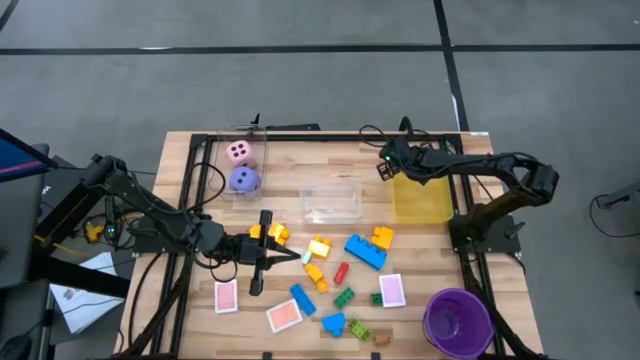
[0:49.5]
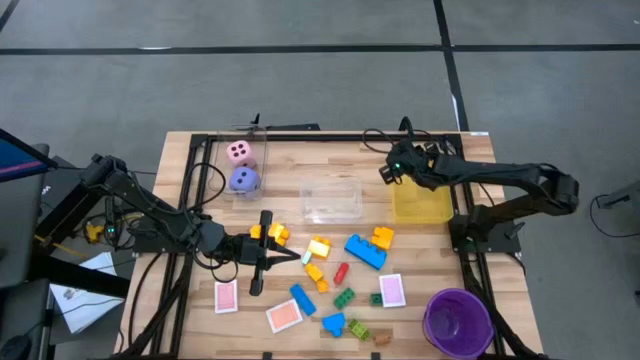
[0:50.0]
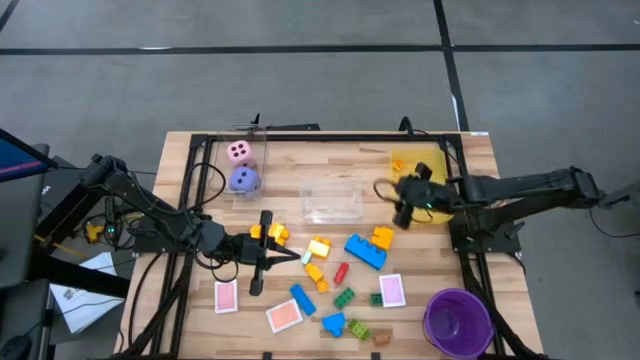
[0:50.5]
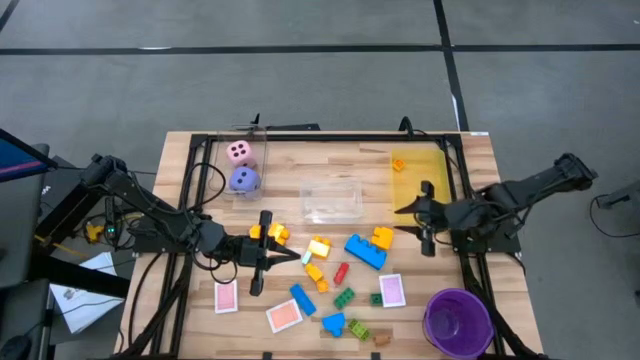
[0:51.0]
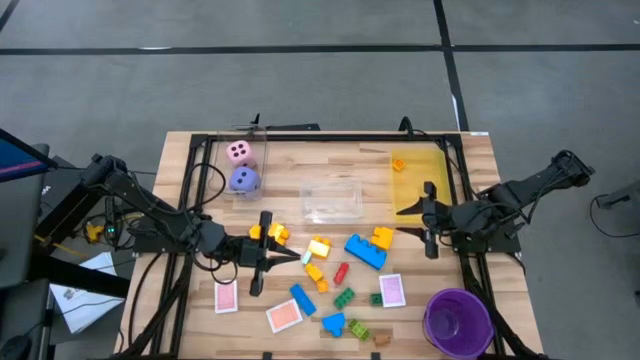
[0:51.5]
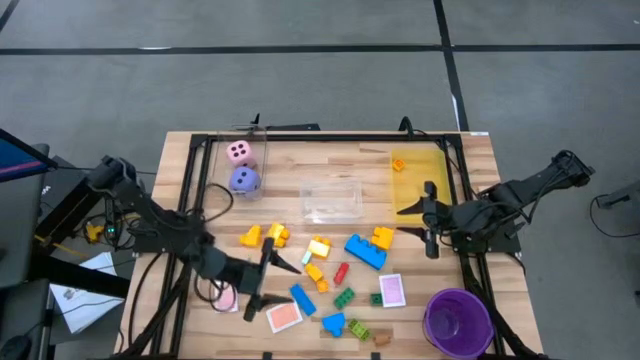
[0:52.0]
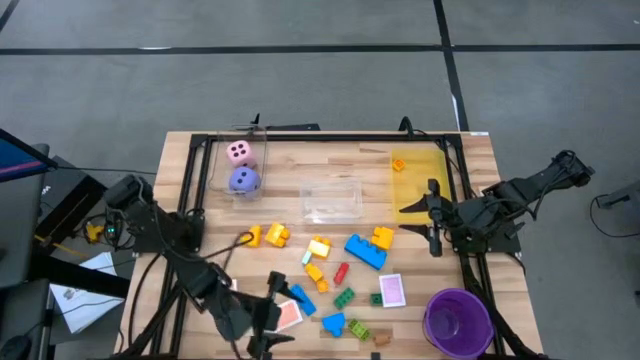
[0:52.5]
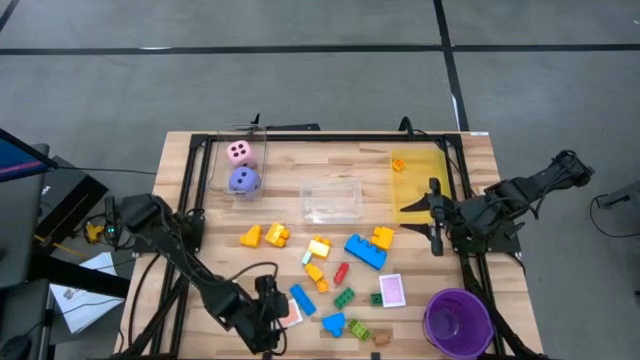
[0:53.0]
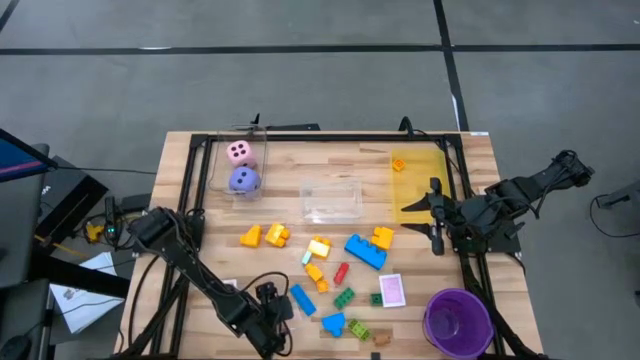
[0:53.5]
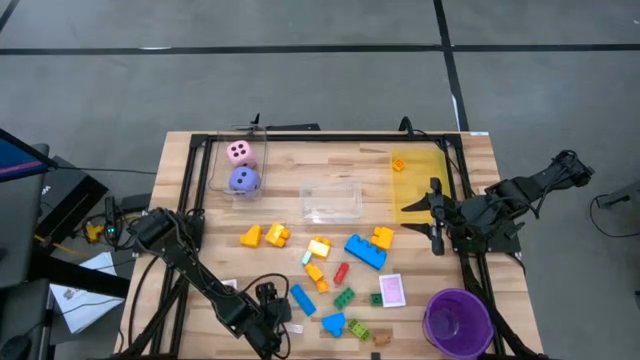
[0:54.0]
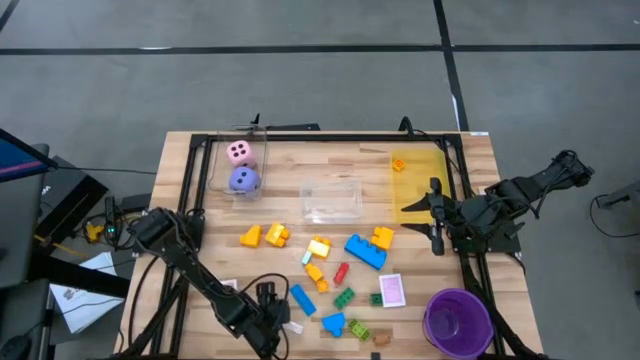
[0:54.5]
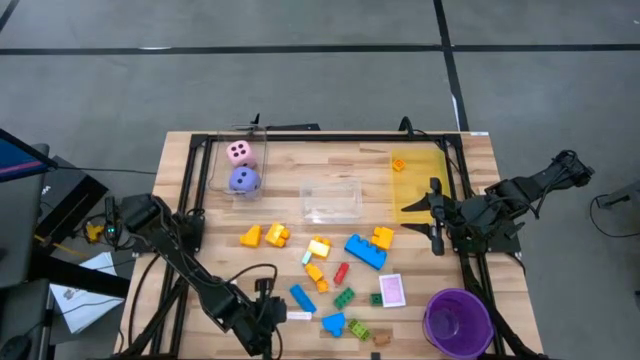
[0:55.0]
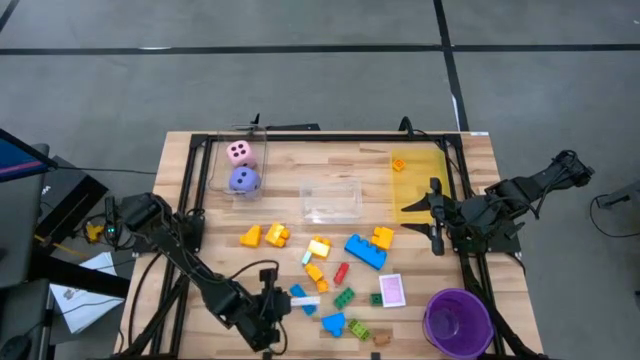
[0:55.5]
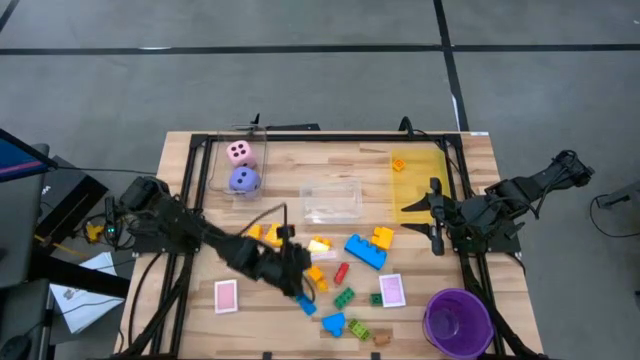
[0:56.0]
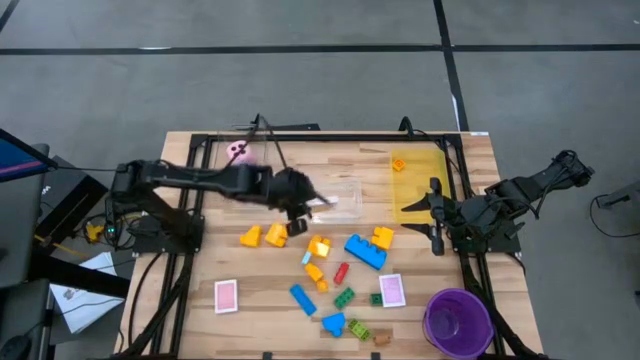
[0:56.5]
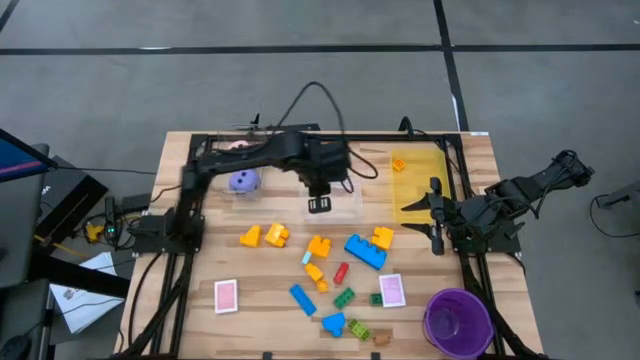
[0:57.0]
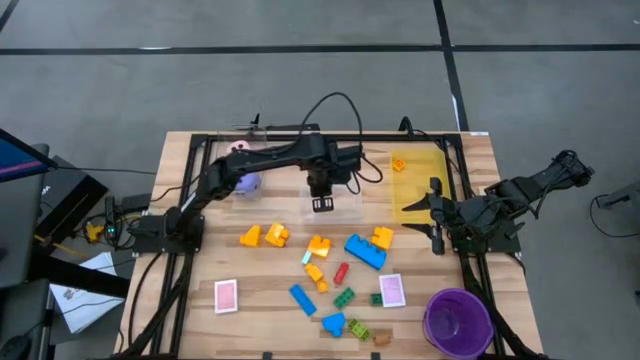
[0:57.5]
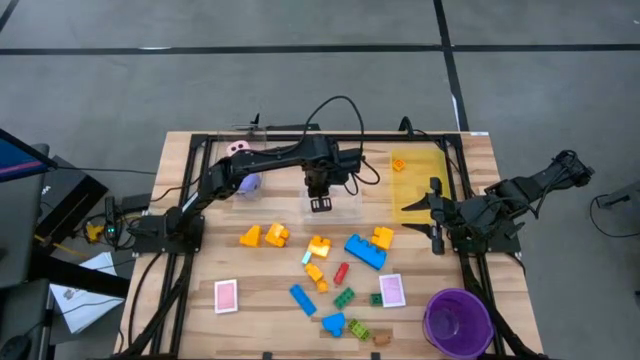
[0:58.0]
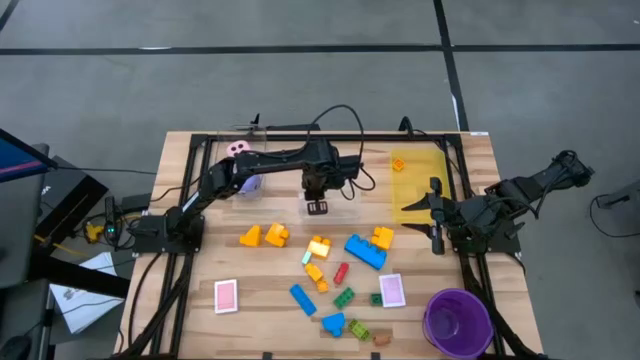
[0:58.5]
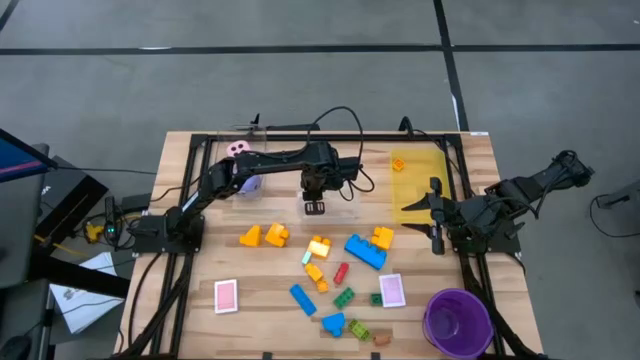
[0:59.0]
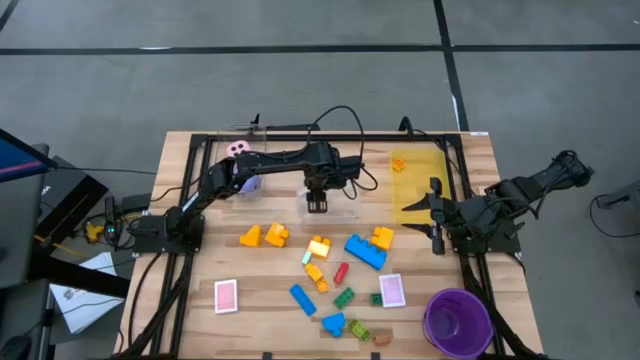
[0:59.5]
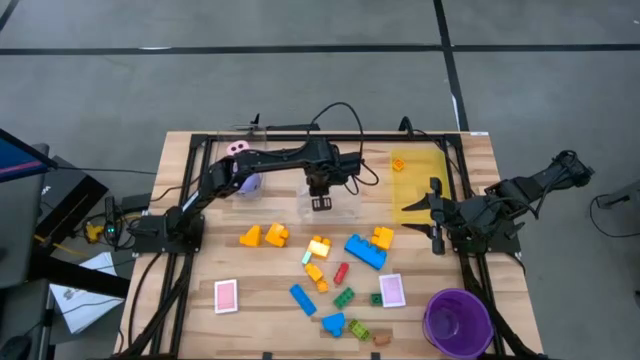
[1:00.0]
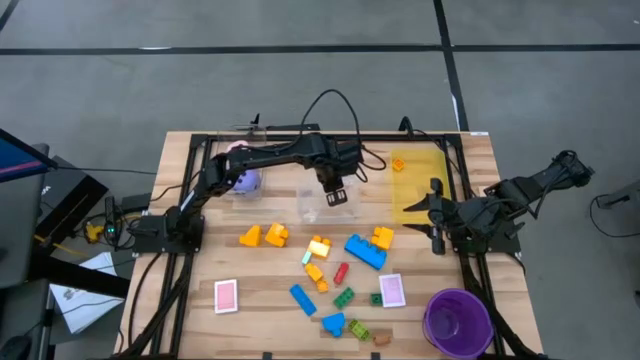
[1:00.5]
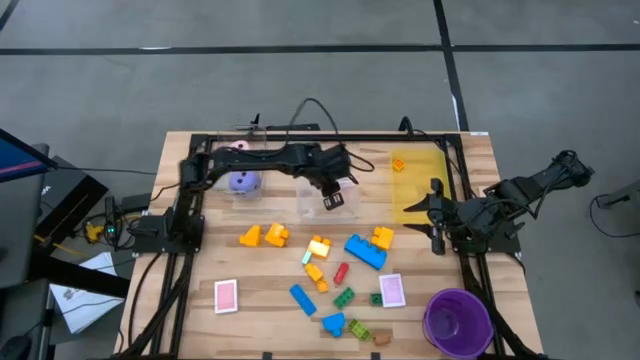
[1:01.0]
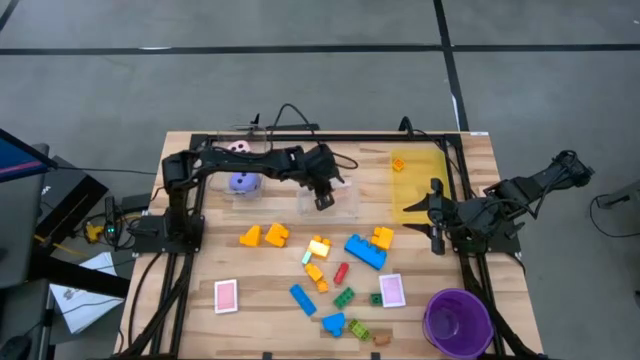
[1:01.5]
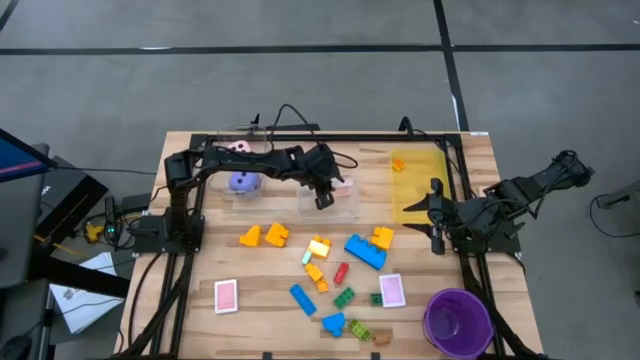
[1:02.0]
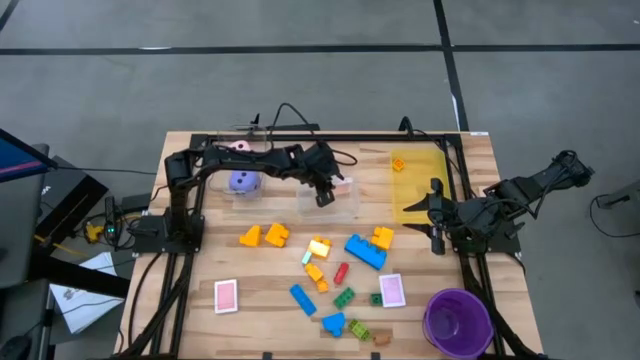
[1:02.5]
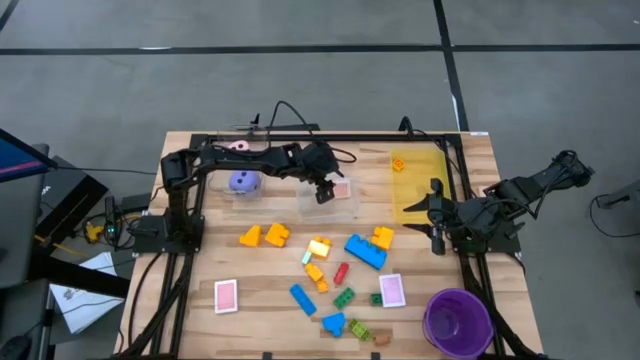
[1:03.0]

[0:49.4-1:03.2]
Task: Pick & Place Toys
Put the orange deck of cards into the bottom transparent bin

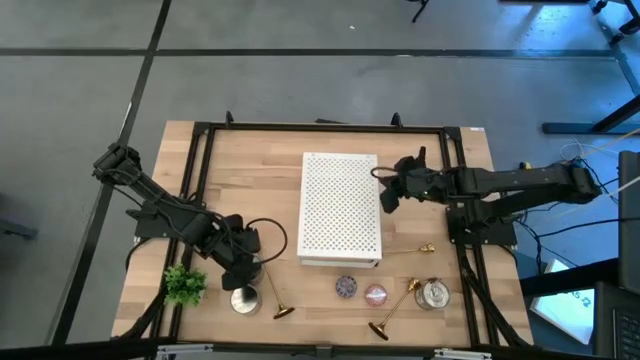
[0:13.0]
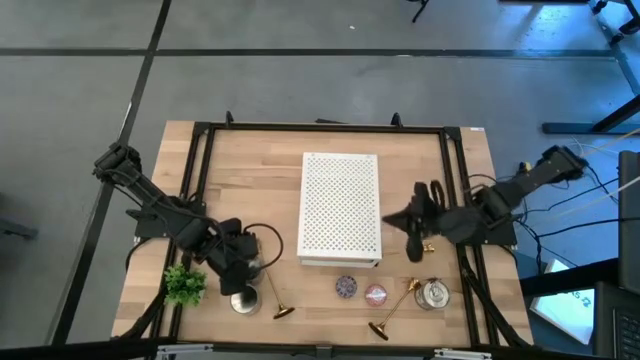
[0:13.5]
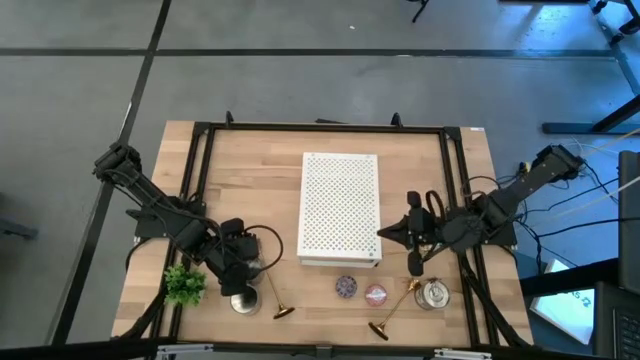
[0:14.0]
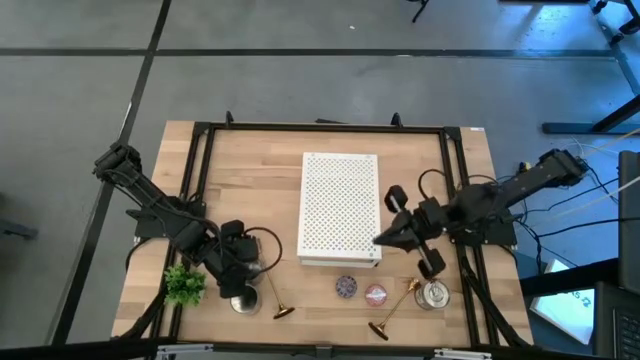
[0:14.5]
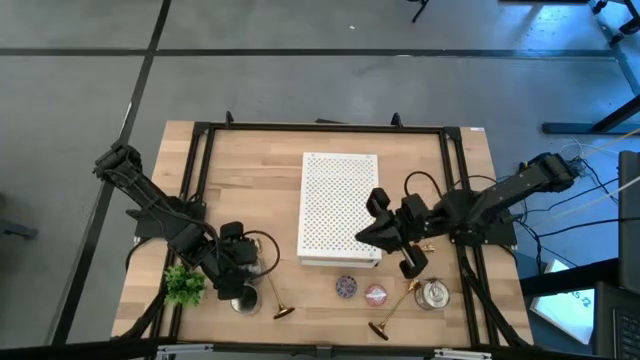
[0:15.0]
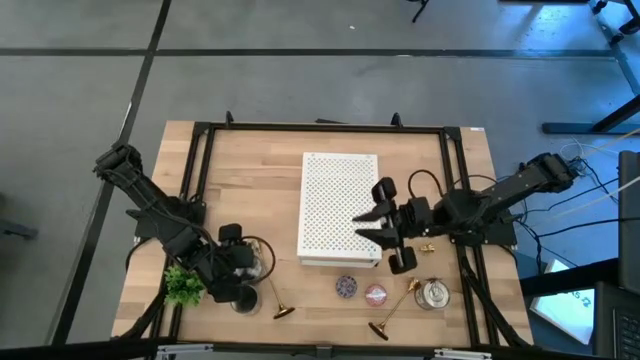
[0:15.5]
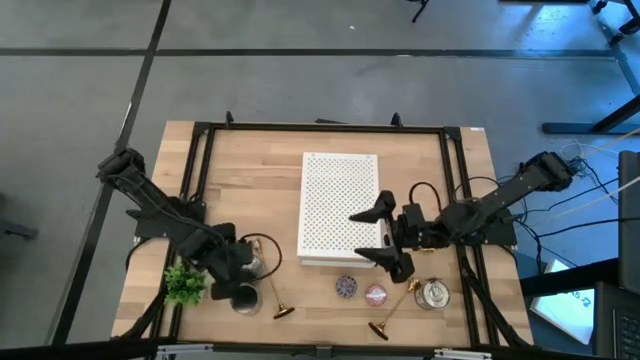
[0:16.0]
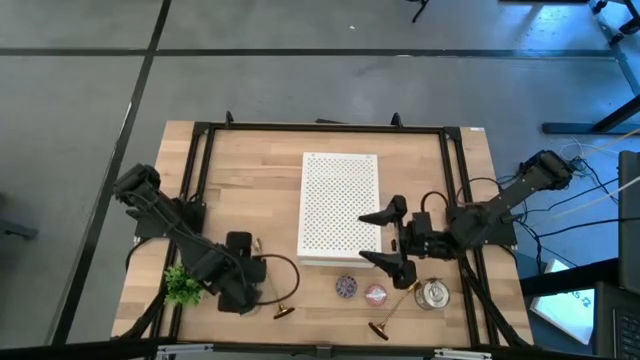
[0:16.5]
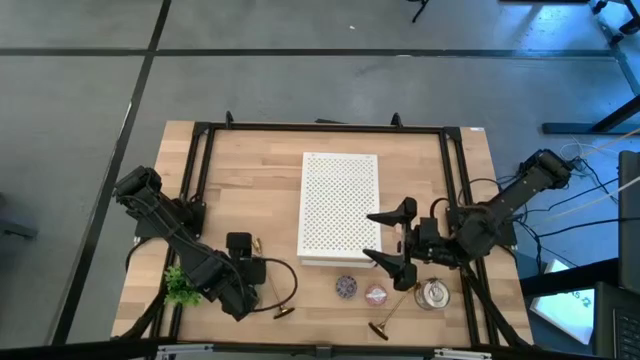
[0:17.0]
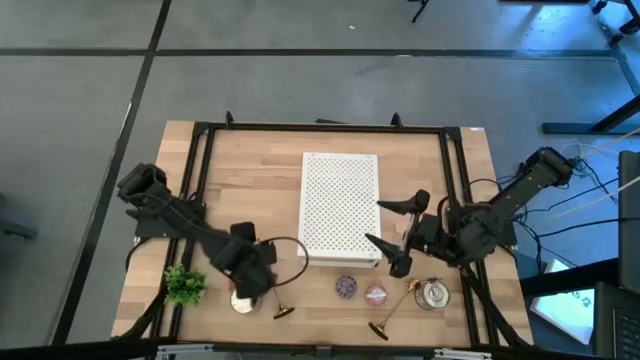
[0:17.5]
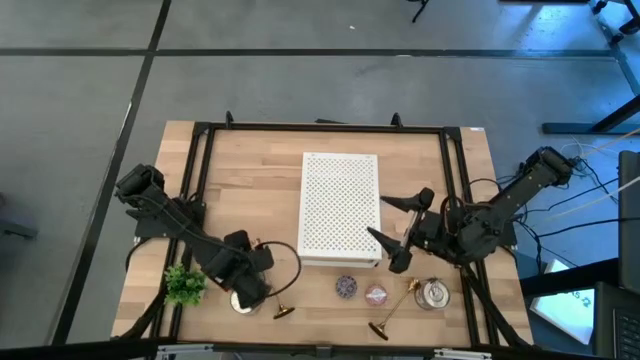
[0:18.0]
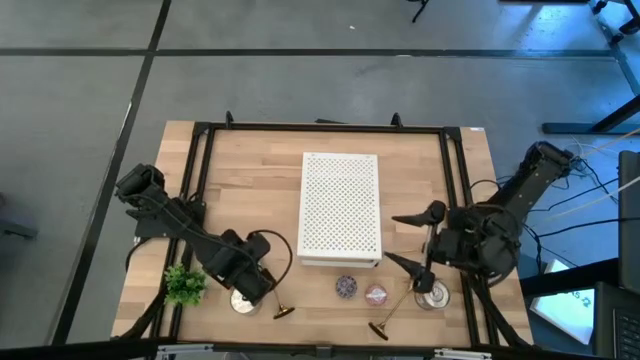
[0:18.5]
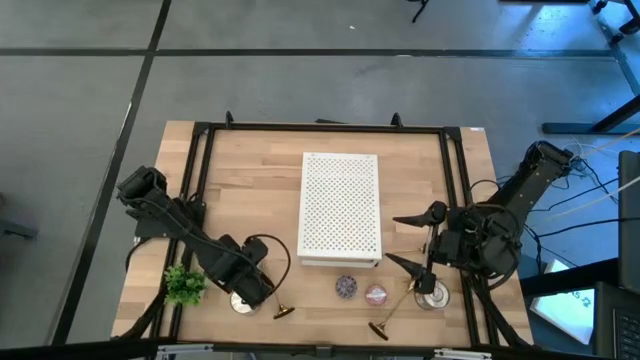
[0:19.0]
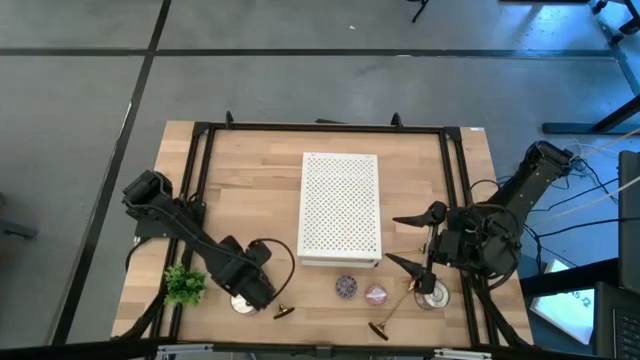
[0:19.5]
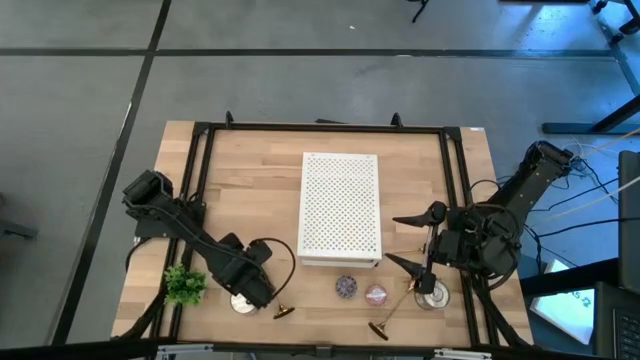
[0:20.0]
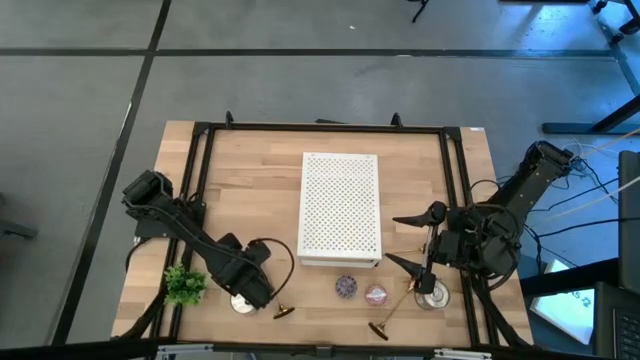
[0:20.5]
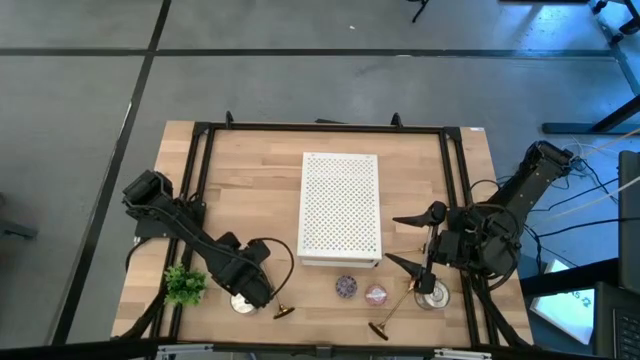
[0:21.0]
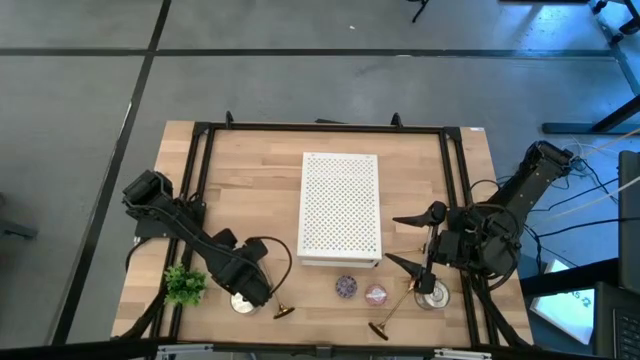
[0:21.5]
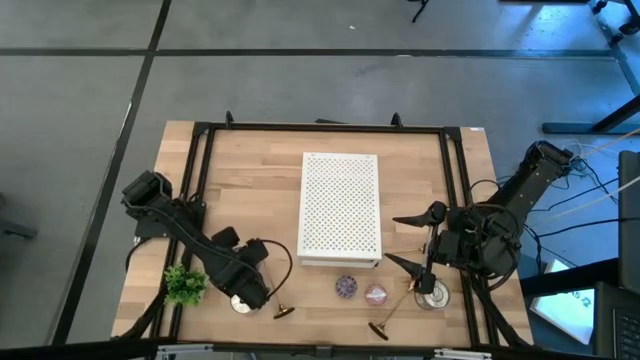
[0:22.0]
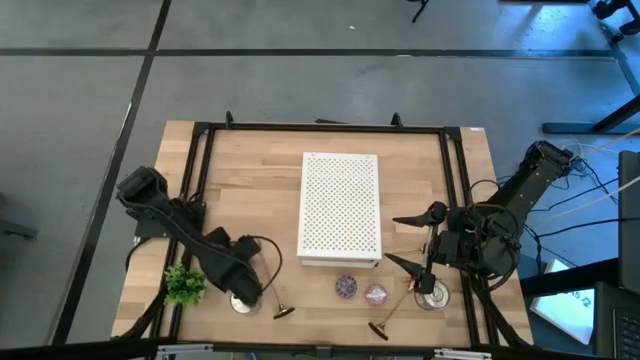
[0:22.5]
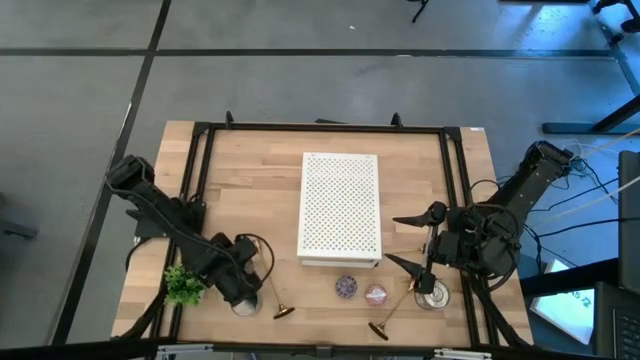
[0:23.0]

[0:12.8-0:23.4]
Task: Pick & Place candle stick holders
Put the top silver scented candle on the shelf
